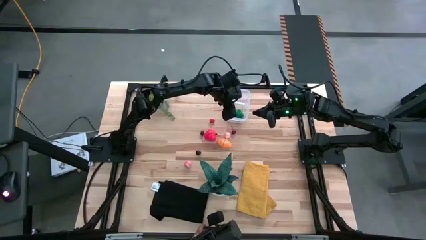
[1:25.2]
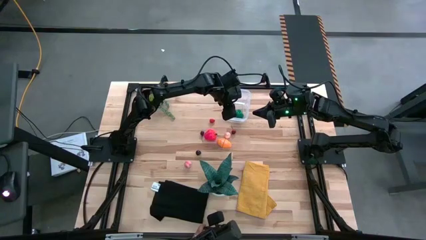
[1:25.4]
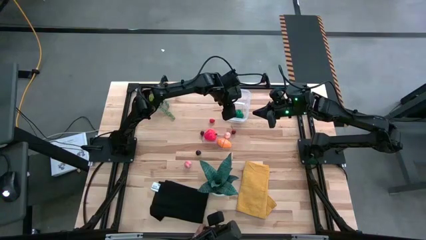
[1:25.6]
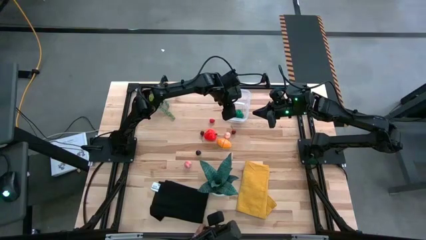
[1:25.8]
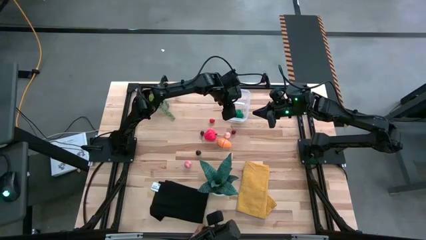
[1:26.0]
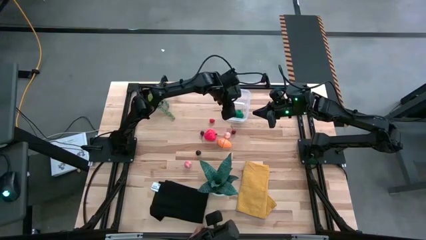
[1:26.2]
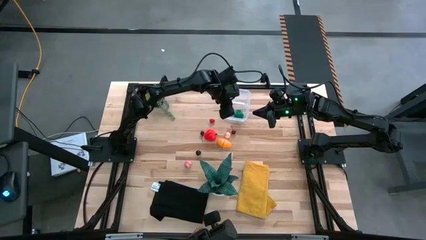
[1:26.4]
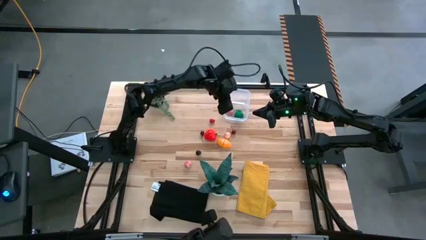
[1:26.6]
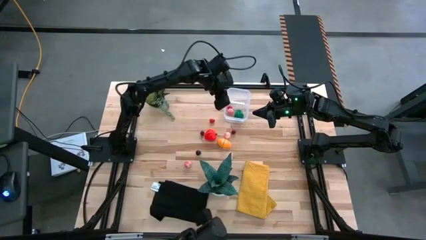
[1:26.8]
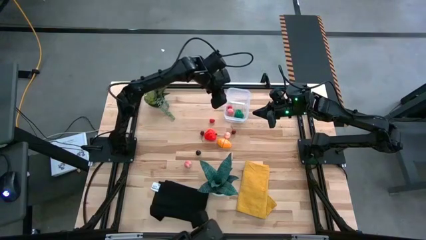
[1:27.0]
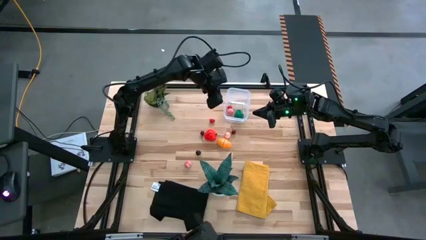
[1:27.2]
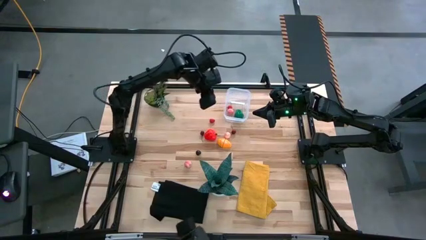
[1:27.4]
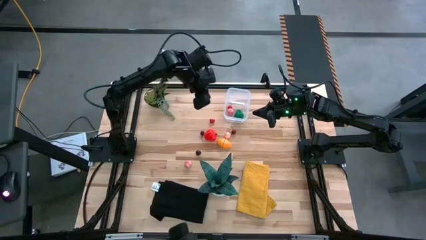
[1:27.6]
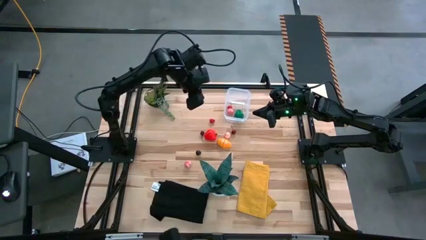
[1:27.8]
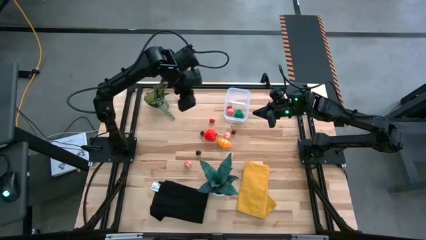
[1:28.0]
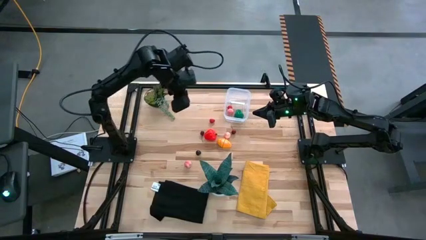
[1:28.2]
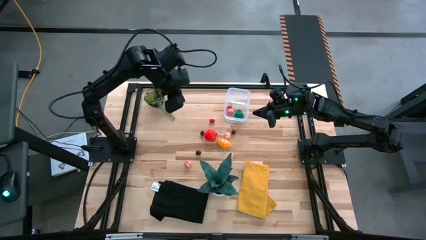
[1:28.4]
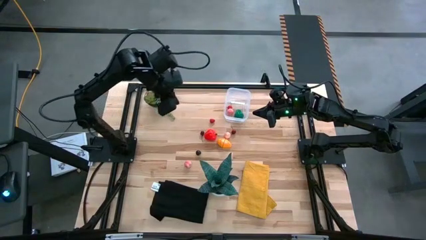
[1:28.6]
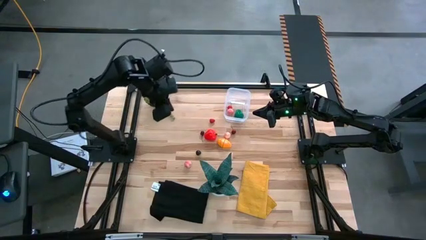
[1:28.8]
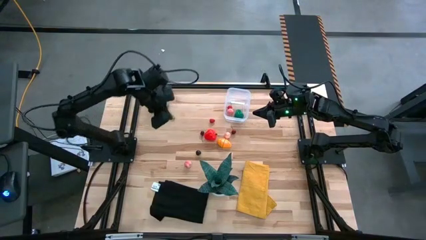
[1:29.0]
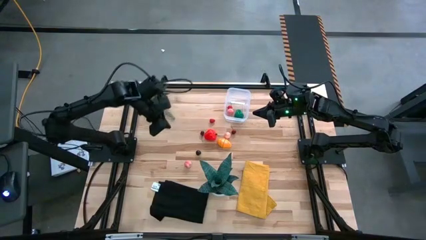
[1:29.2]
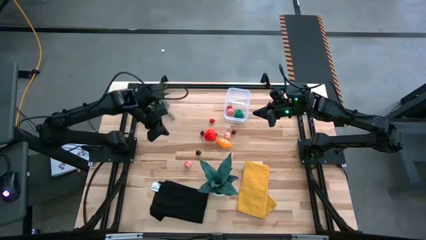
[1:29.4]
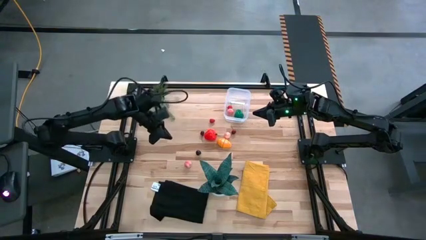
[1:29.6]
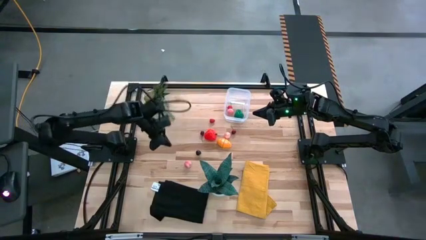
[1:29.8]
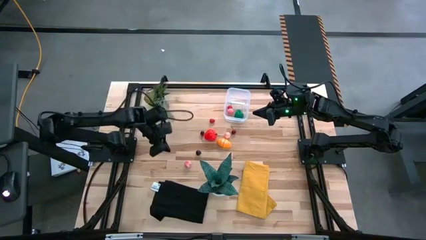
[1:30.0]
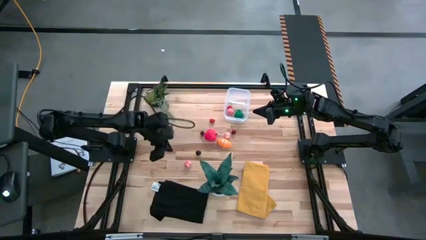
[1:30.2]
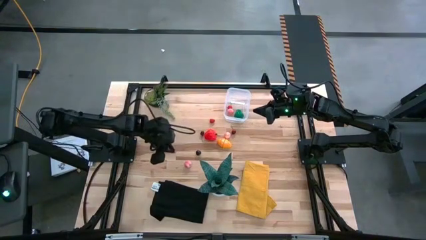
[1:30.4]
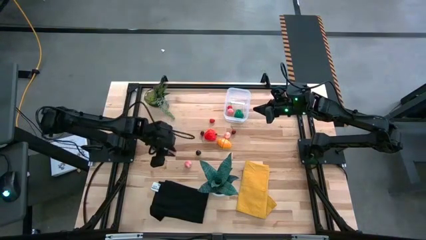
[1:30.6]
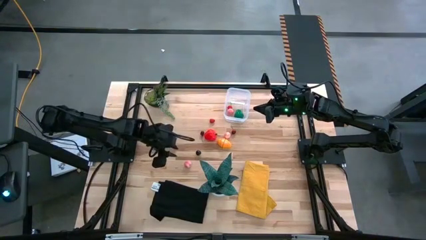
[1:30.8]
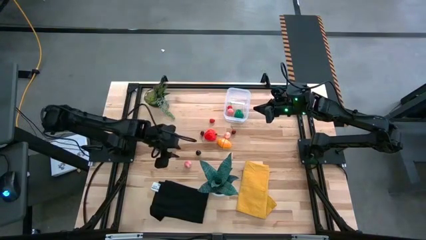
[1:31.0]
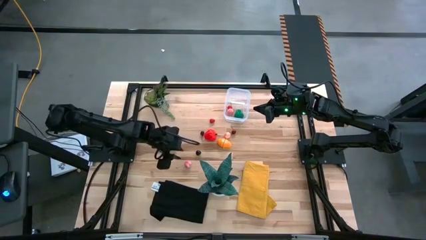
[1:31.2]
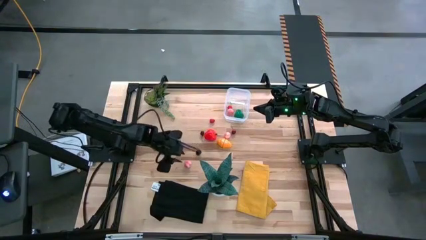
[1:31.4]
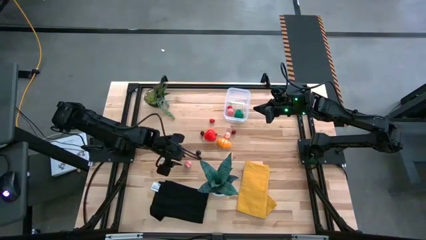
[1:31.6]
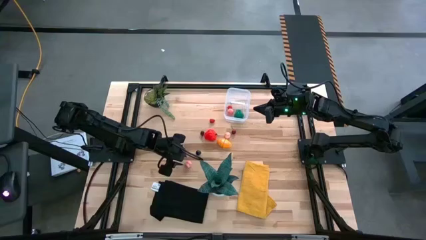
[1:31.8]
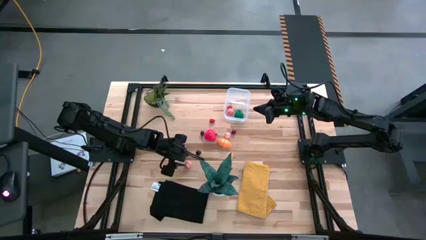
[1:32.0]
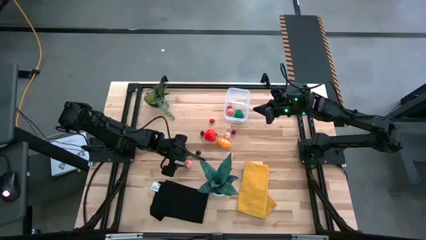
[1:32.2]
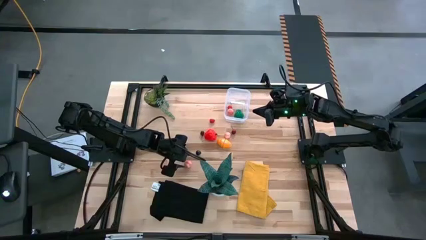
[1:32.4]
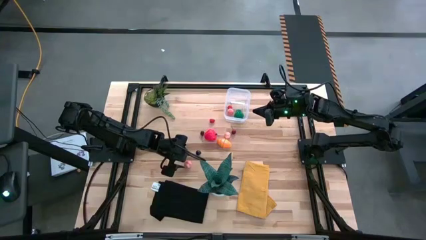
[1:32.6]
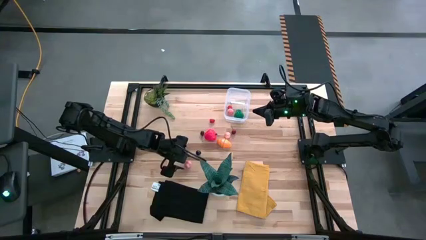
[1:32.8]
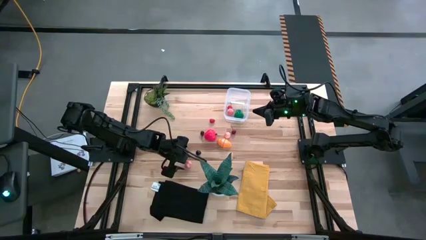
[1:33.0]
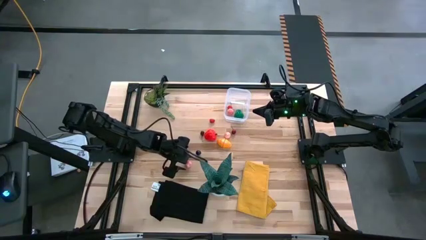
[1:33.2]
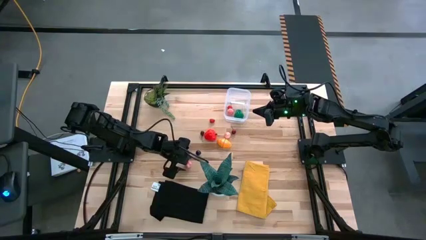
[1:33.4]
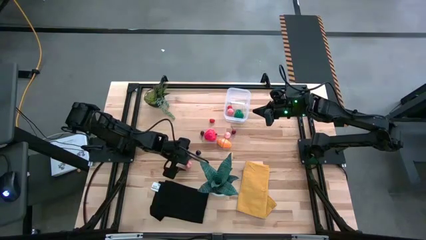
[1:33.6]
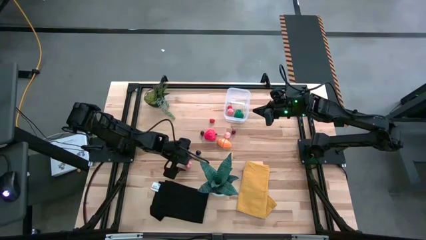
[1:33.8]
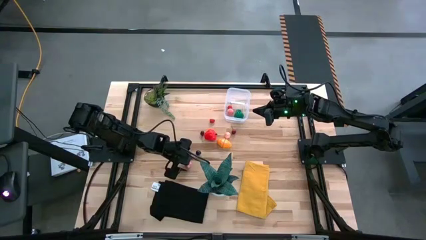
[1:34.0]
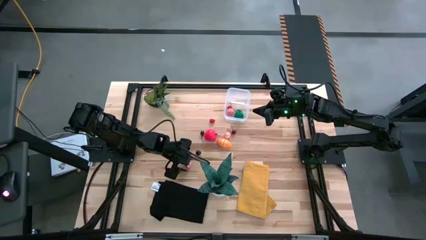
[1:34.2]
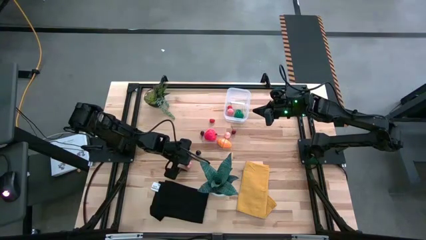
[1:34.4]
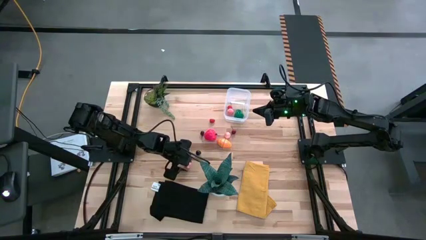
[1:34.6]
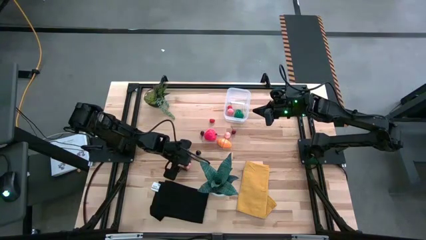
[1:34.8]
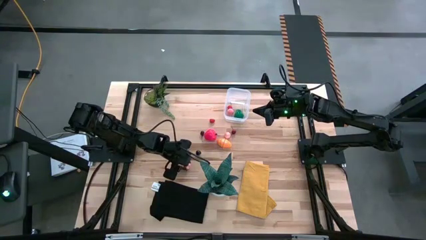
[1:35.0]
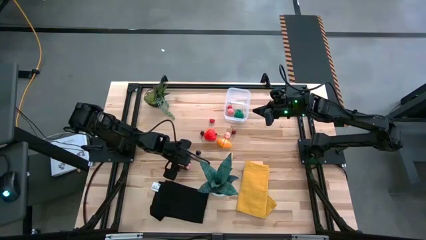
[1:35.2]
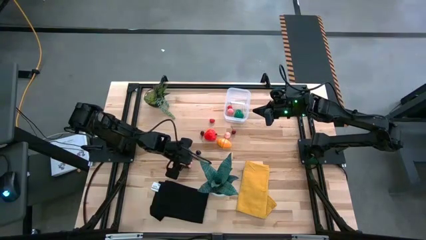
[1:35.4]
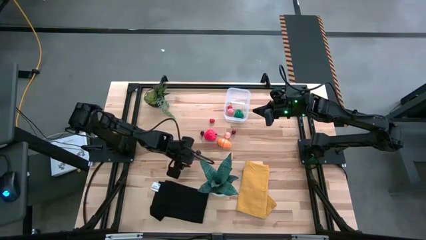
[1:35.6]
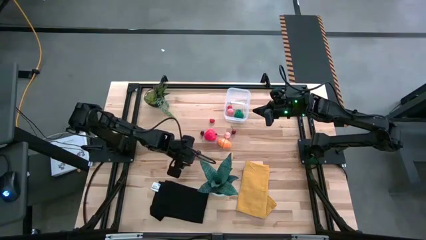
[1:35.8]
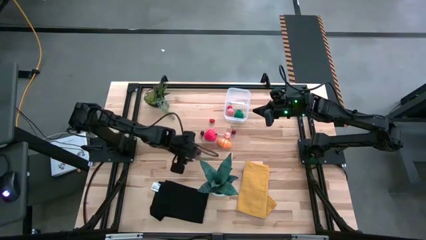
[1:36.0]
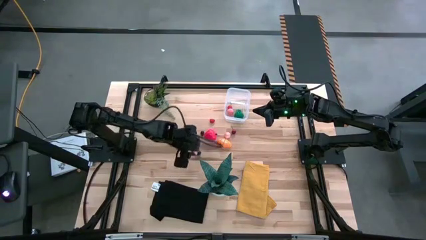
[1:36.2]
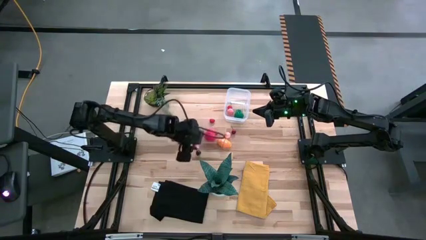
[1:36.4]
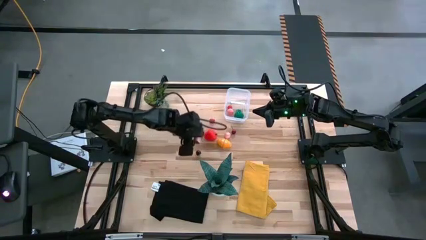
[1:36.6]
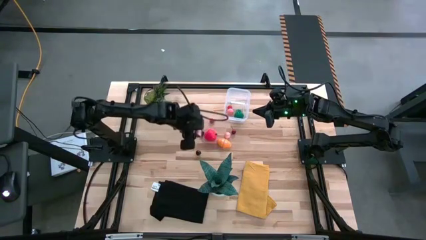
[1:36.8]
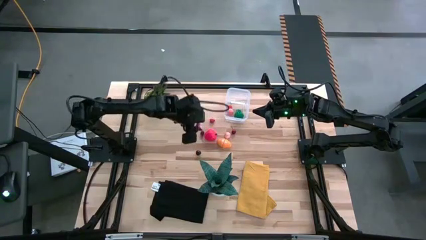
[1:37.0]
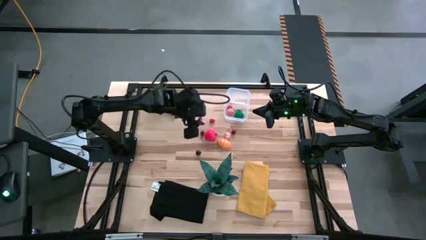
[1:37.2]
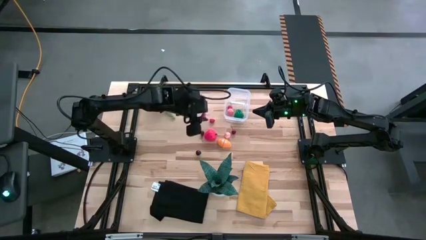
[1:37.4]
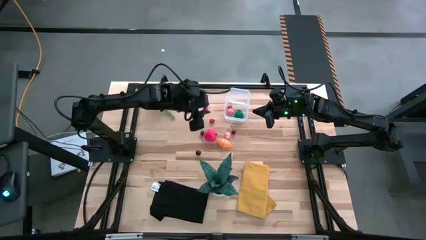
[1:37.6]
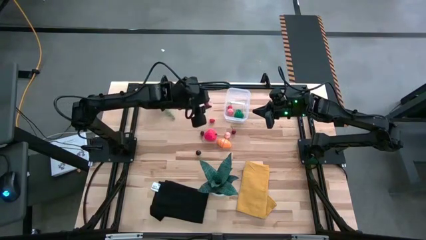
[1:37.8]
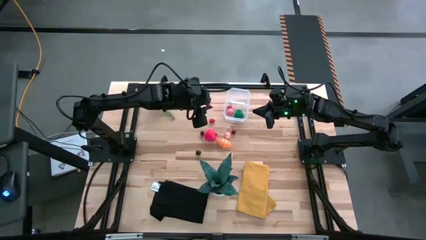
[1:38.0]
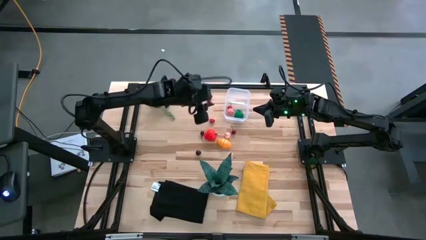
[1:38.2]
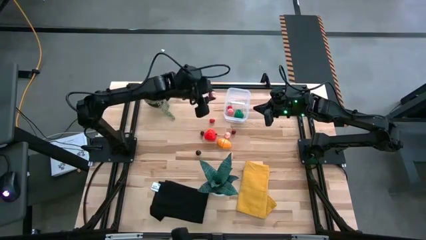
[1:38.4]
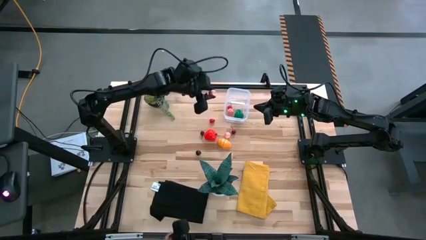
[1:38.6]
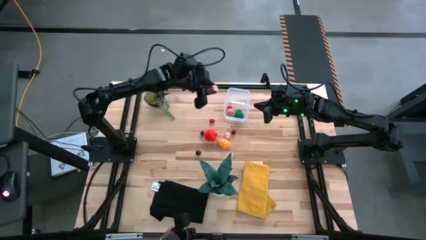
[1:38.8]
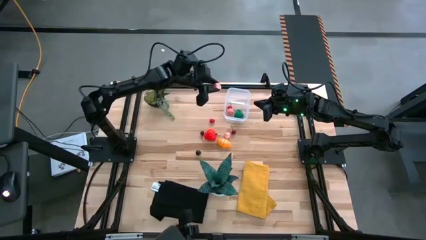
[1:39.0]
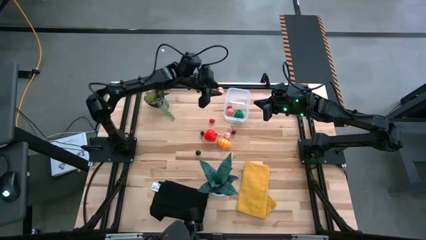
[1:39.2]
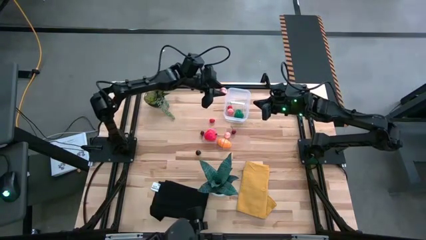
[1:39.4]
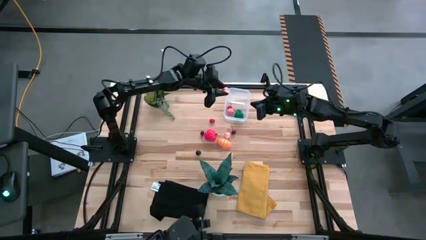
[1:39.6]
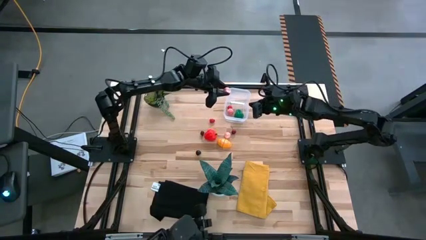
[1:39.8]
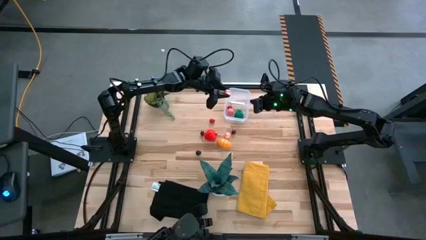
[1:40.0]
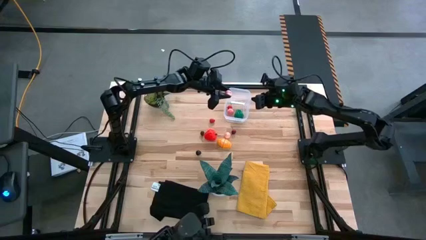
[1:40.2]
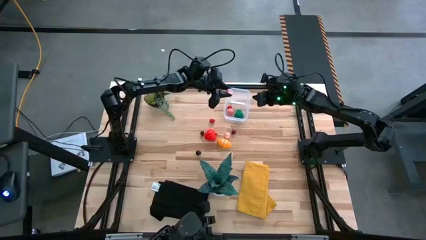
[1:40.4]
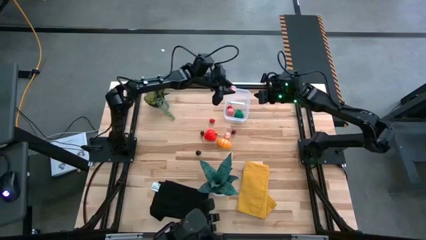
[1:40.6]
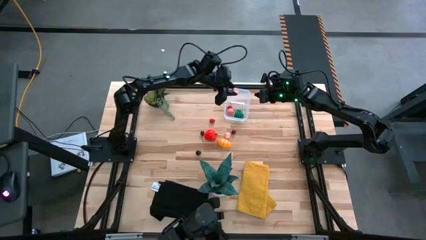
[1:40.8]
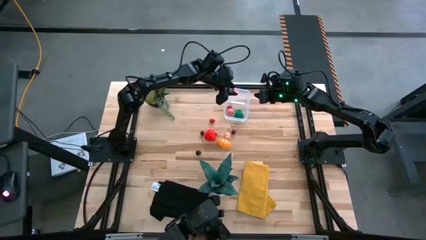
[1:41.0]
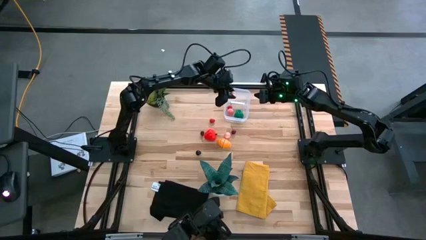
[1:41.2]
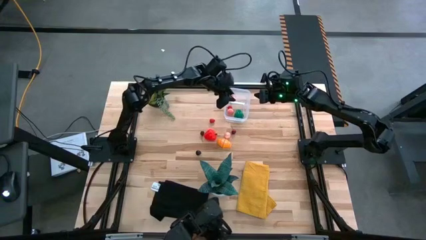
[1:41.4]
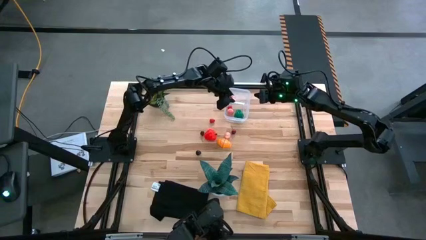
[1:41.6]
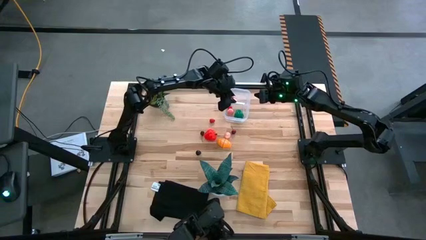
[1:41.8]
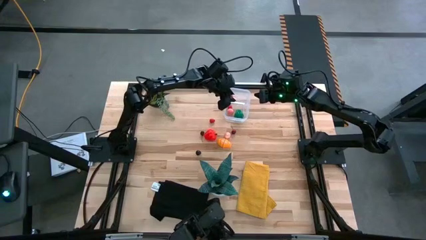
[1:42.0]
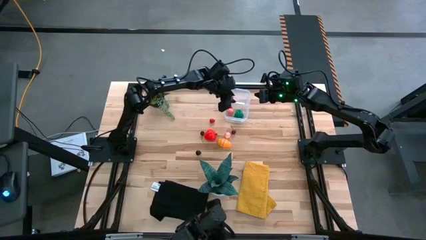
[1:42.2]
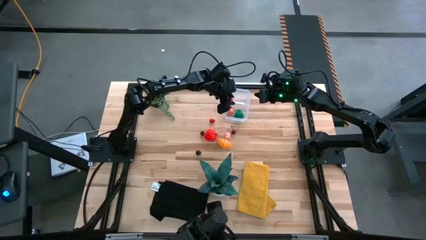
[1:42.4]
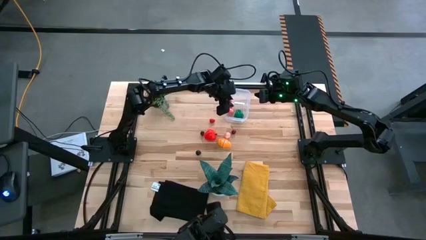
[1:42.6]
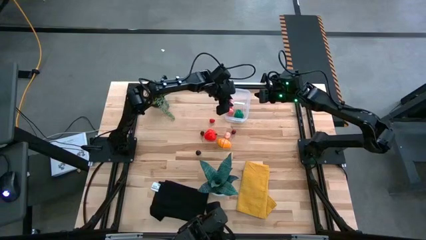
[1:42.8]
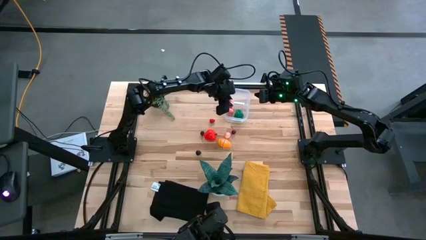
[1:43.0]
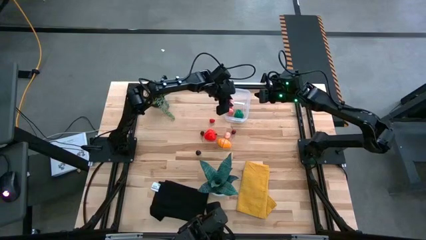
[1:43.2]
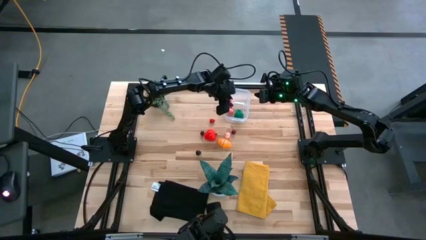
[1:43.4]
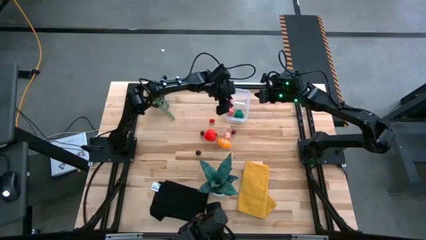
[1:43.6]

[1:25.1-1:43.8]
Task: Pick and placing Produce into tupperware
Put the bottom apricot into the transparent container
